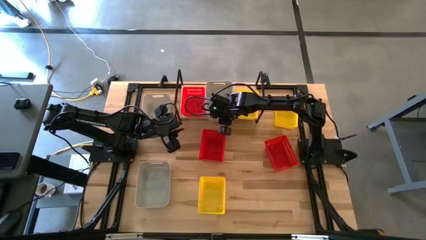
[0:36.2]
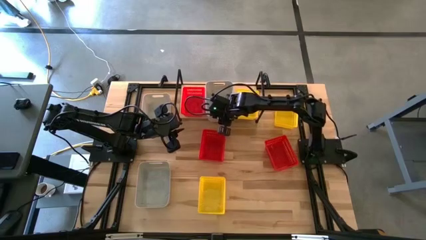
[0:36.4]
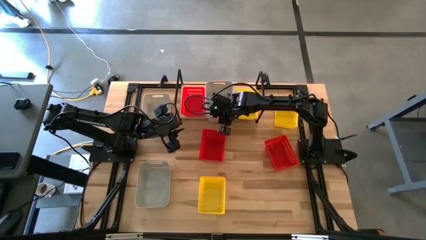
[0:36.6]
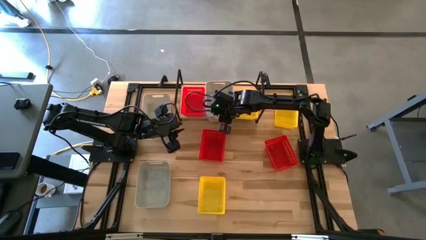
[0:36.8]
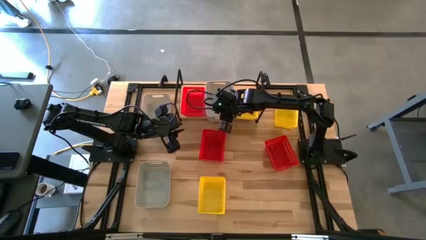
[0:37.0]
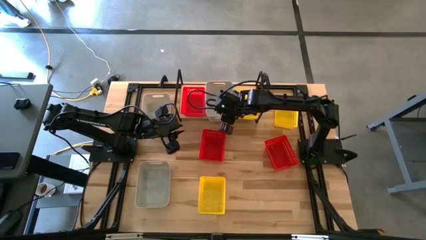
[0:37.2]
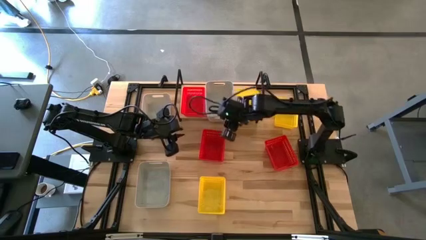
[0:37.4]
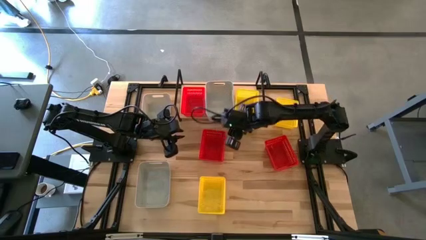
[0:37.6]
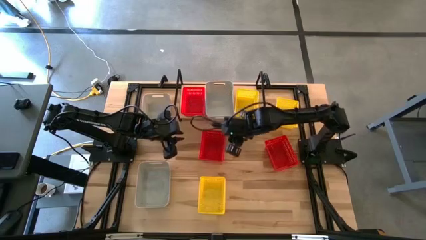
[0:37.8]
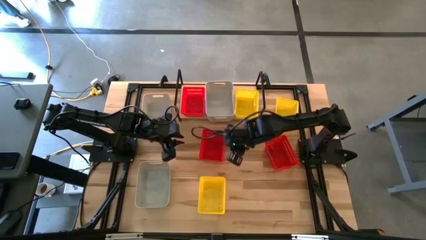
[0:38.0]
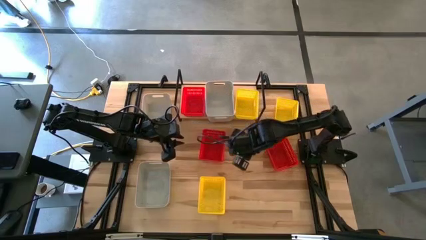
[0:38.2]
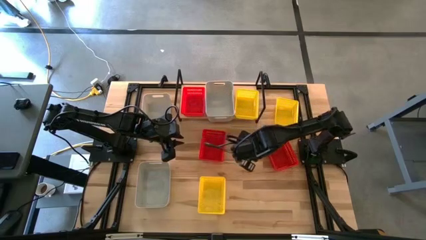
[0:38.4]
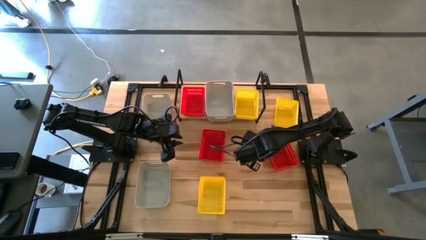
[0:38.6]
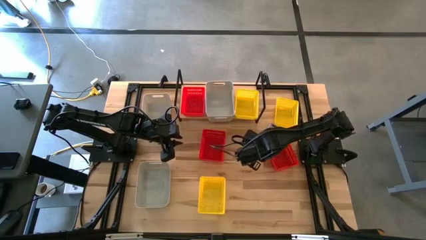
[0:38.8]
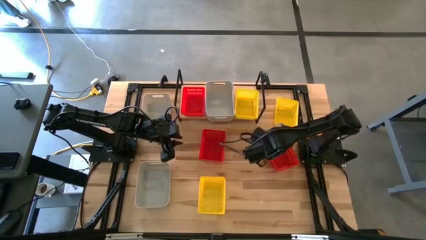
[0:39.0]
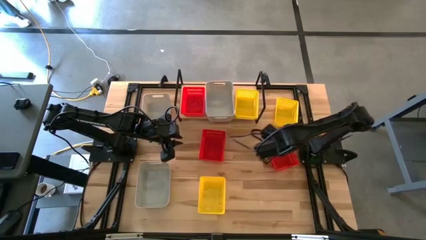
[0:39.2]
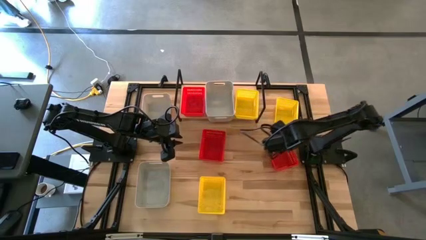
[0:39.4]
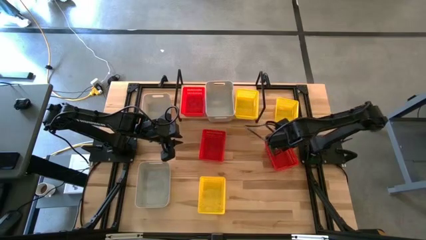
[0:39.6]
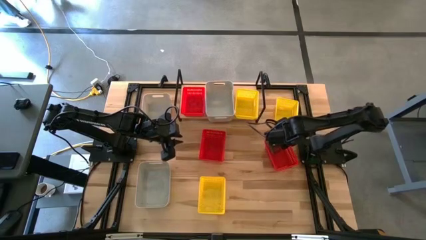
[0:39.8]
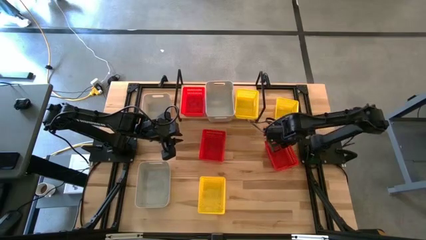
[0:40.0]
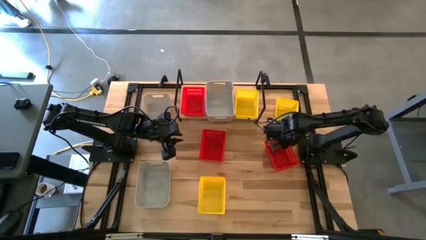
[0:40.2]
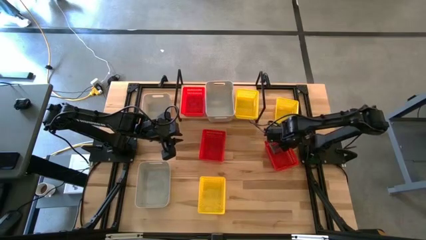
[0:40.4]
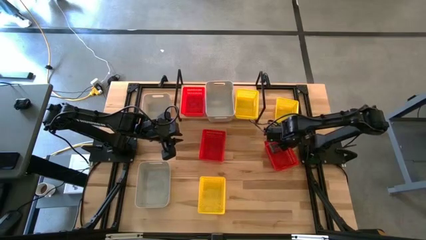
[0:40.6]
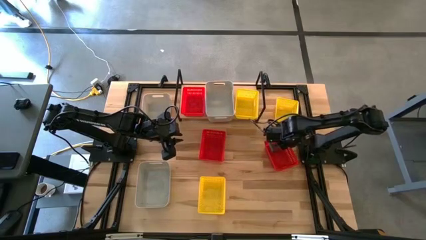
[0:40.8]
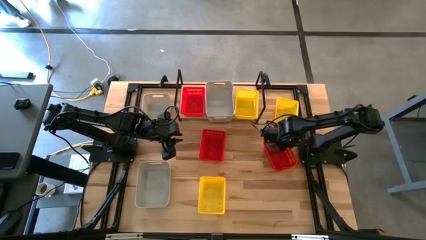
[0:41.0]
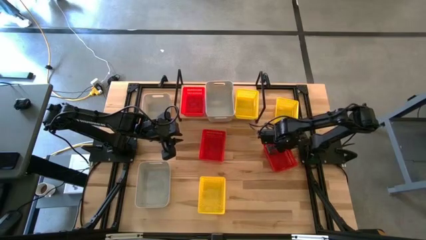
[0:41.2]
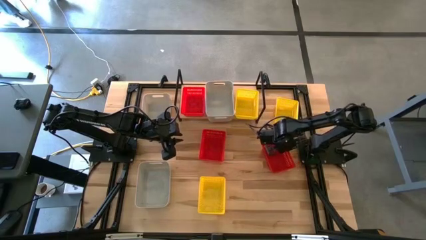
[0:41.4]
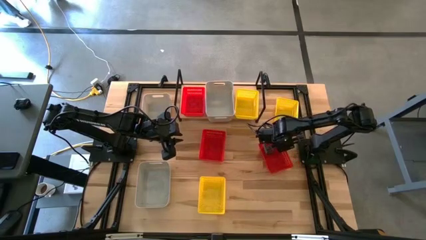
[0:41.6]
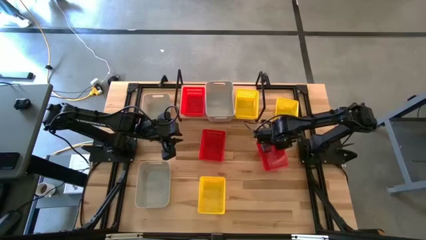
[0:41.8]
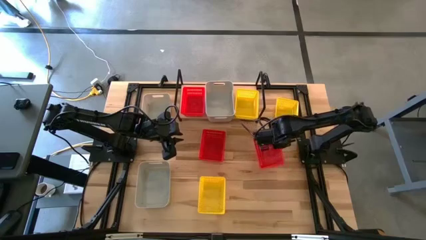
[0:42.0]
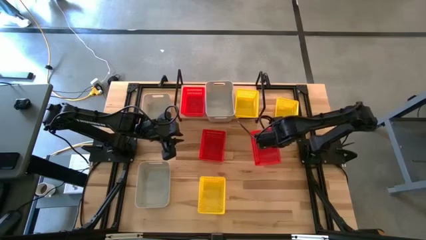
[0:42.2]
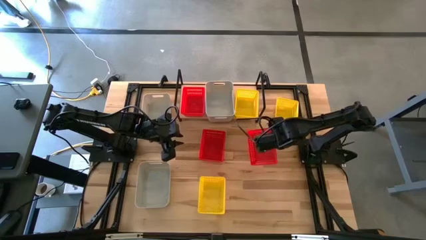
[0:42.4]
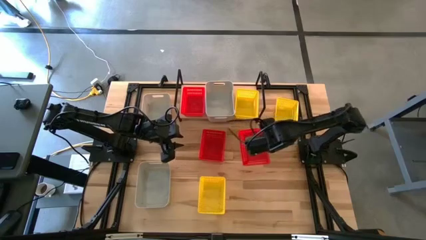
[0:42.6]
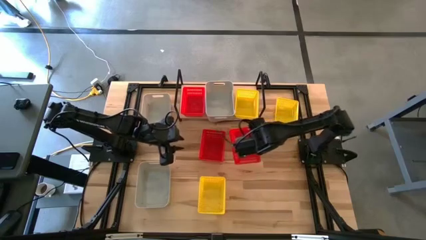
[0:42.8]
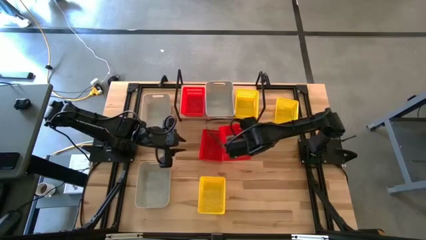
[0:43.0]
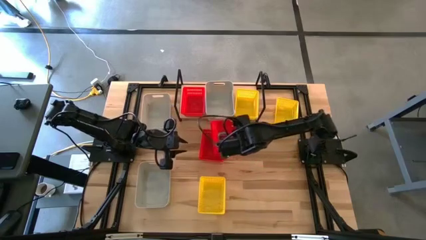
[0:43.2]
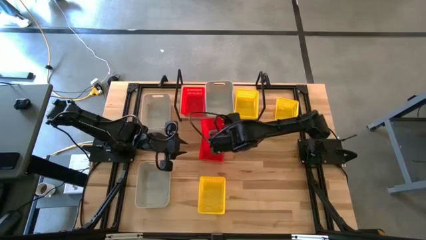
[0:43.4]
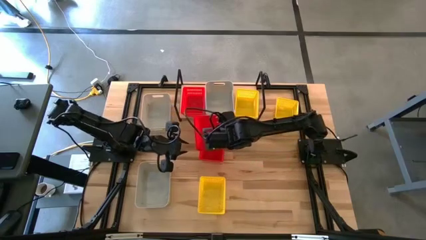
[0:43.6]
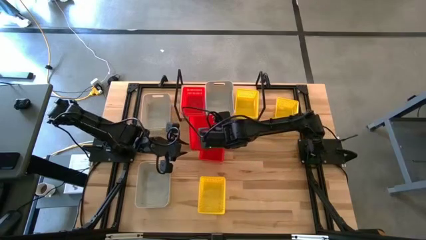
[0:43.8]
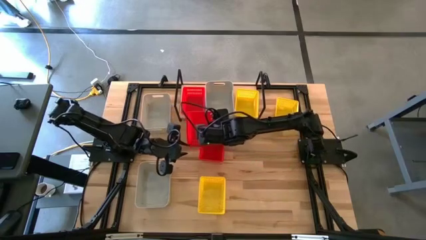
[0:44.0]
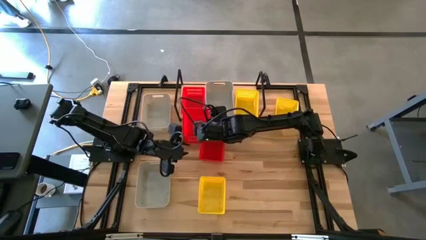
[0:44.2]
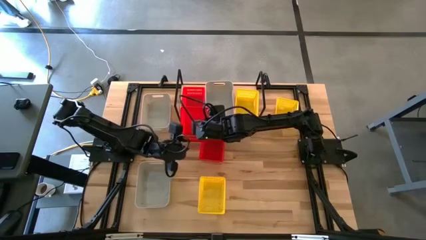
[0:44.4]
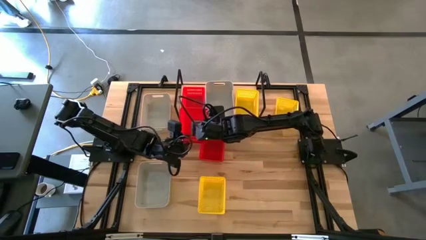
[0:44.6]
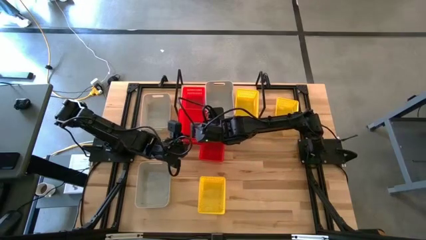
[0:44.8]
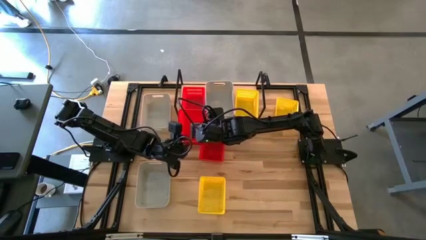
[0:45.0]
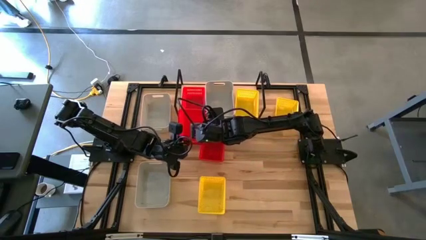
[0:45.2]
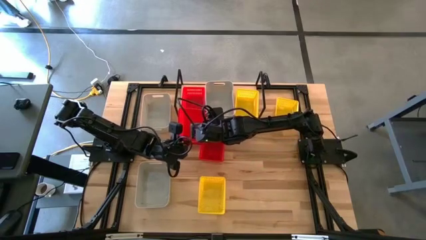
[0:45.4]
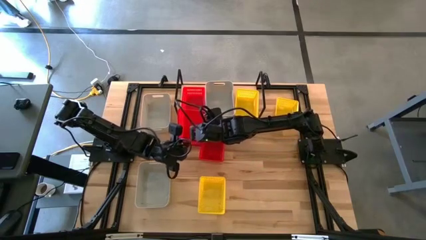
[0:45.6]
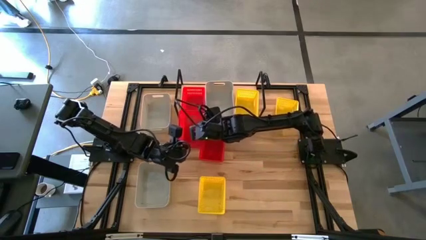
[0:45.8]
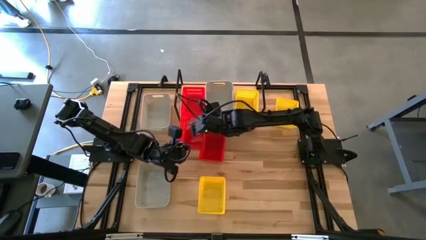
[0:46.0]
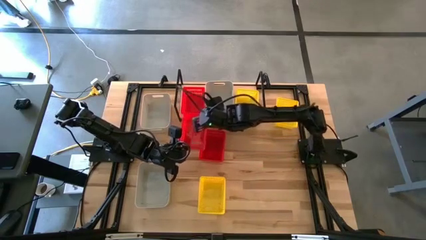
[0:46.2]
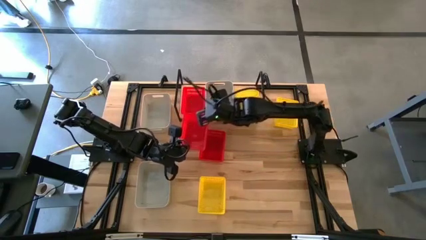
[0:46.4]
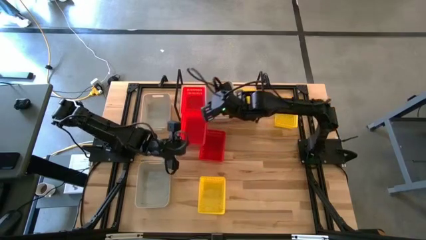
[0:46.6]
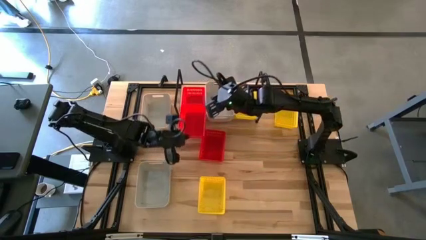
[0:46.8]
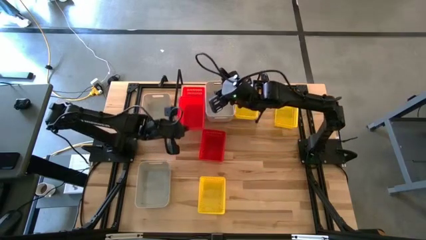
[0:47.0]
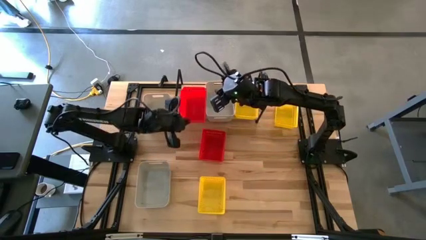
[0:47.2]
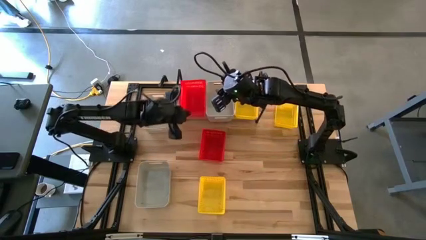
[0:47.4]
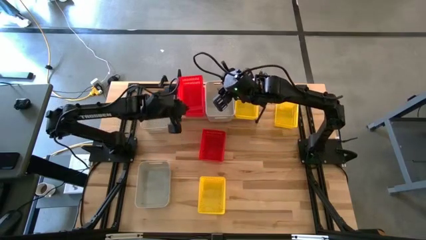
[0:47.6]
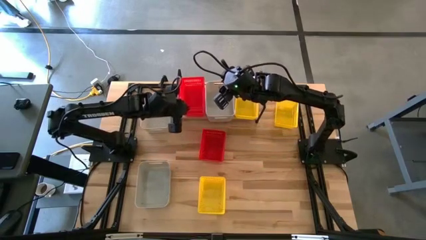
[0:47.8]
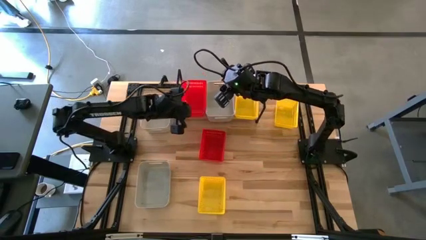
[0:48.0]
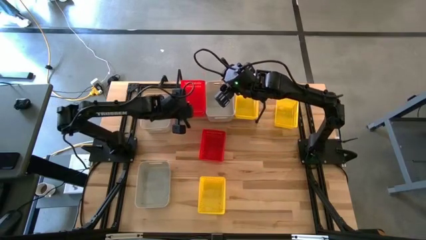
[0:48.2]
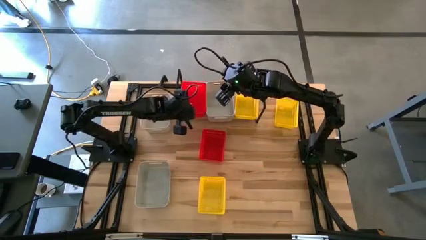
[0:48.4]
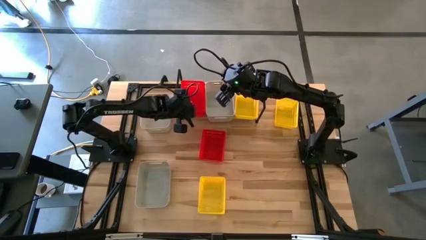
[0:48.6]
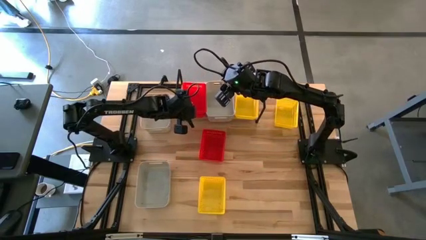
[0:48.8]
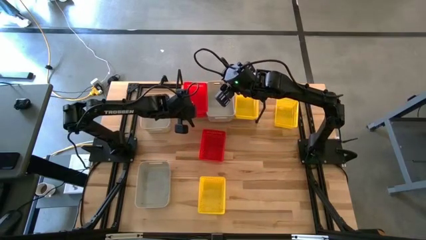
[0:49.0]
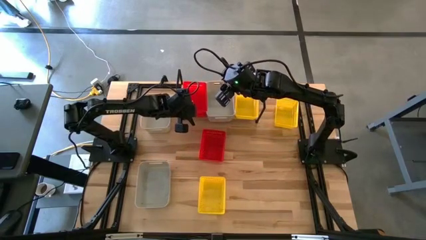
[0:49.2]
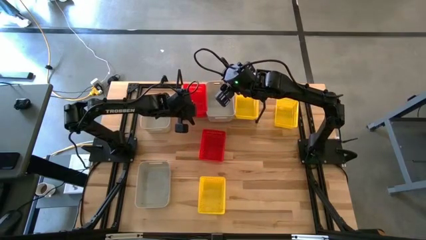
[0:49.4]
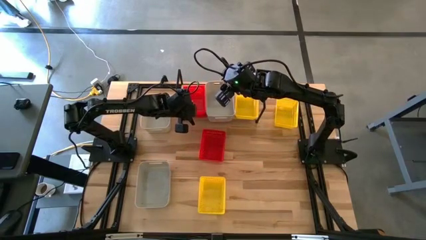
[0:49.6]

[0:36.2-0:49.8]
Task: Stack baskets on shelf by color
Stack the right red bin on the top of the other red bin on the shelf

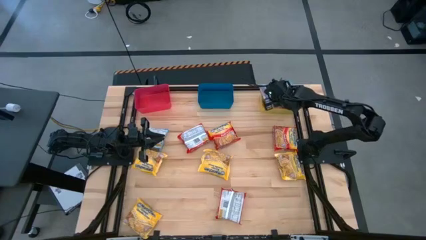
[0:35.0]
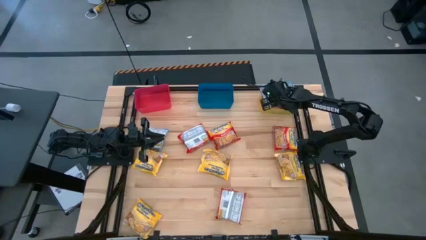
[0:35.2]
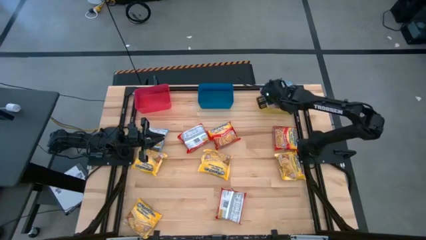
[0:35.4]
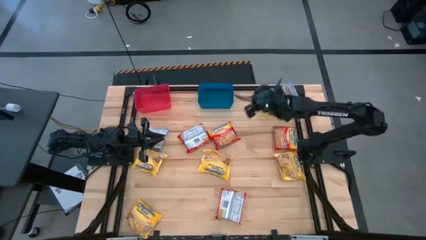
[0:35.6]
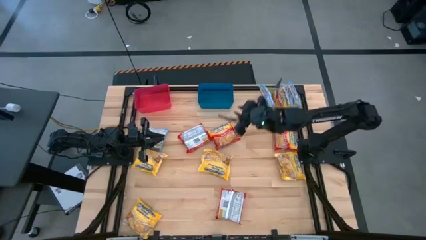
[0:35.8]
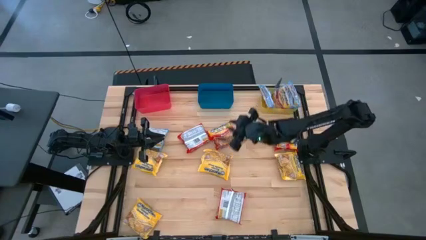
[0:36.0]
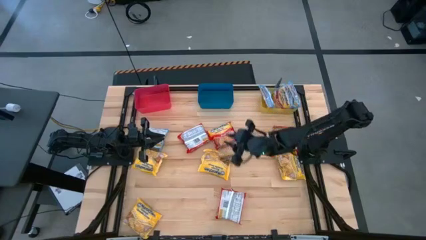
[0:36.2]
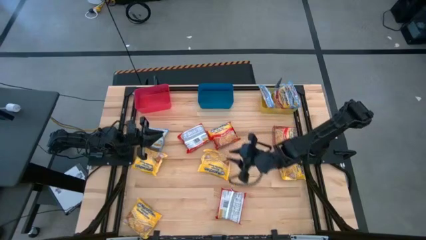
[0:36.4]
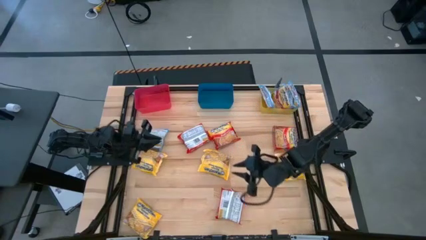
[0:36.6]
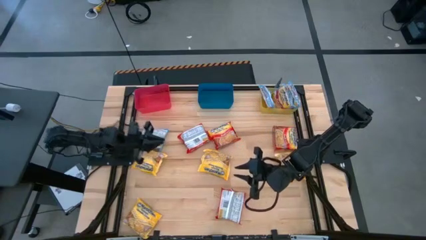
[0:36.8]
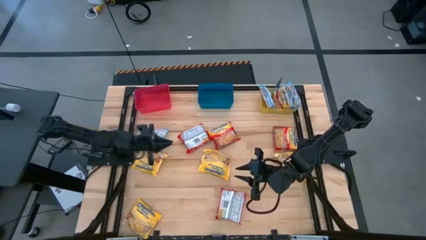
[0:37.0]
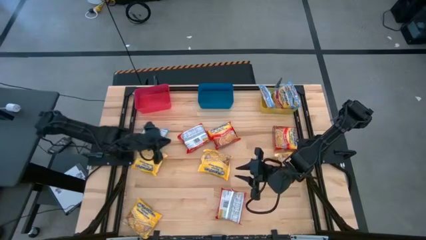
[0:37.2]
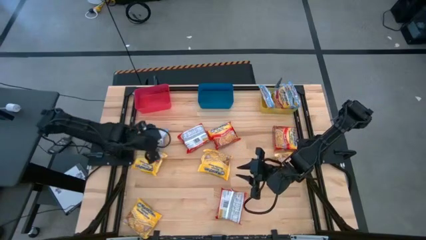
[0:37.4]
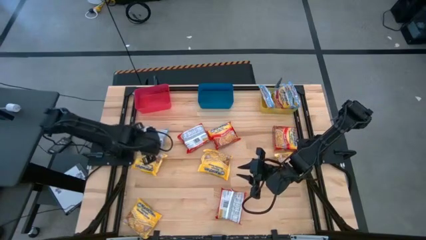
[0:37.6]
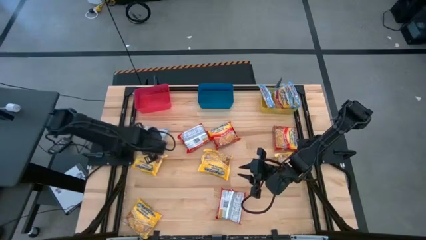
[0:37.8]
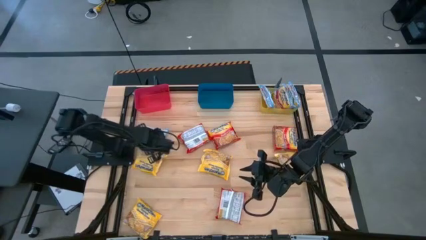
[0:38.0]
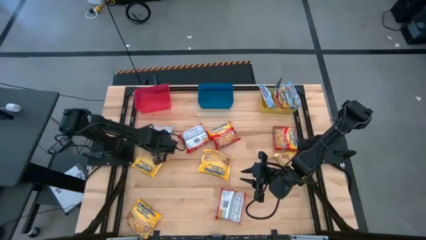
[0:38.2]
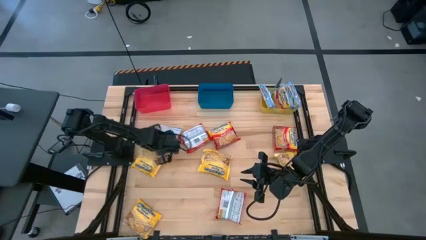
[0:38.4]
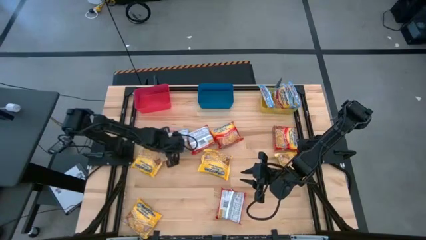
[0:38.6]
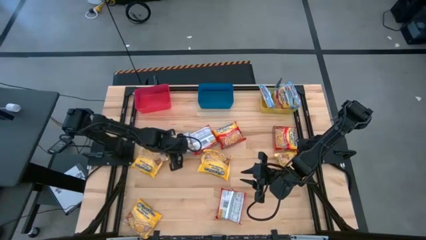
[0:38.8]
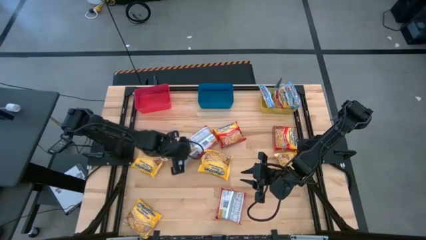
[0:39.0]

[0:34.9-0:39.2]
Task: Sort Maruchan noodles
Put the blue noodle pack into the yellow bin
